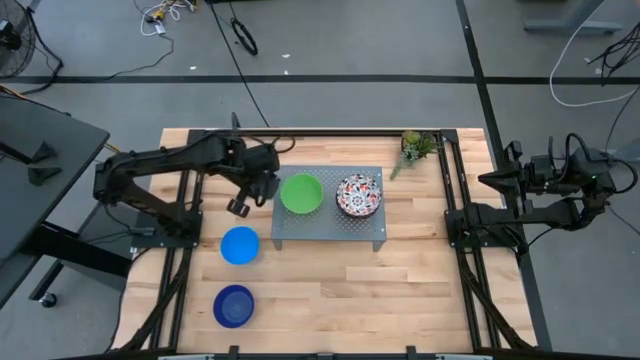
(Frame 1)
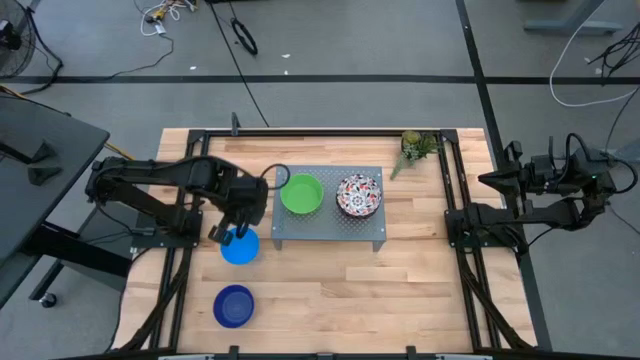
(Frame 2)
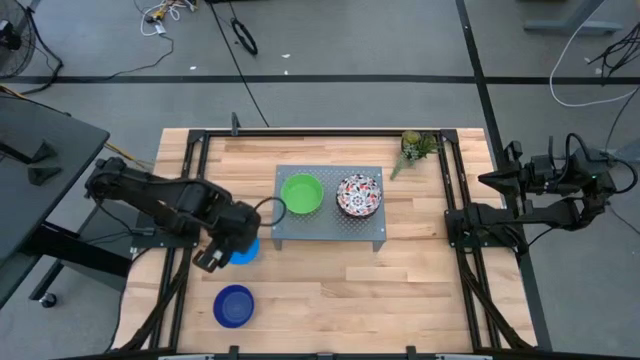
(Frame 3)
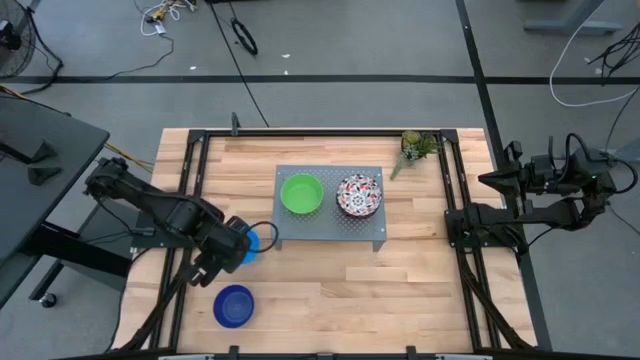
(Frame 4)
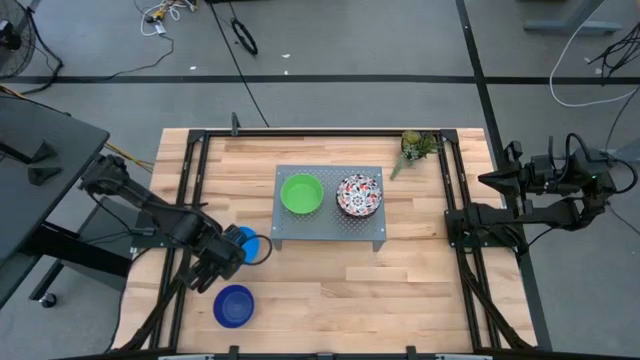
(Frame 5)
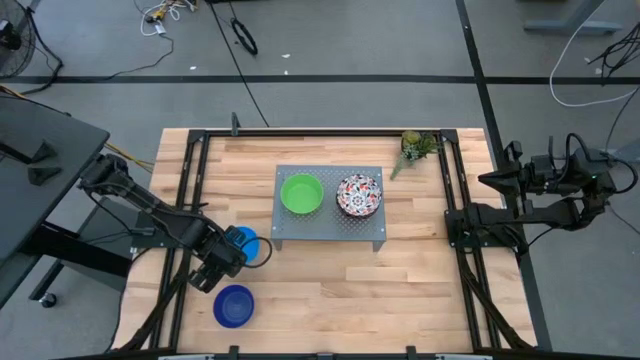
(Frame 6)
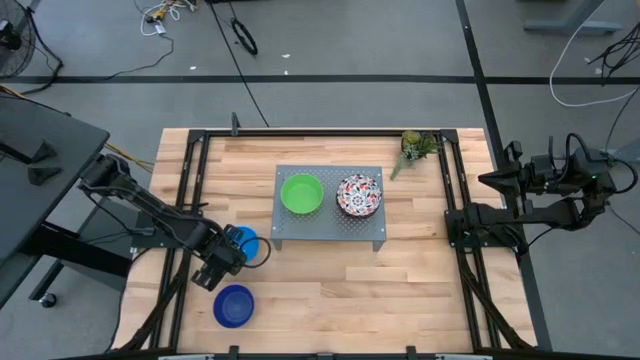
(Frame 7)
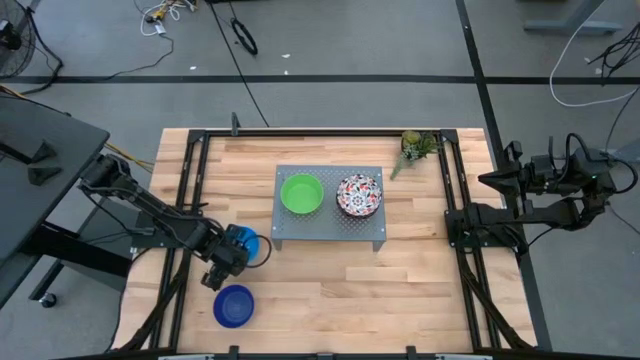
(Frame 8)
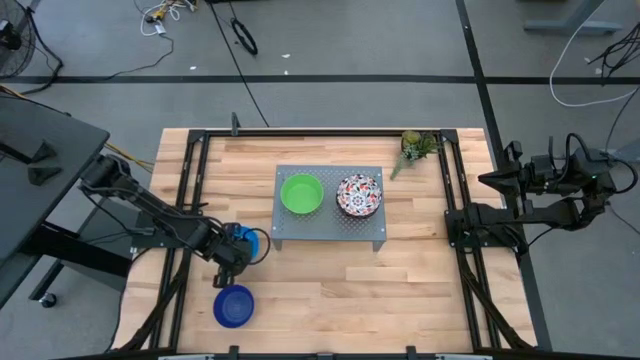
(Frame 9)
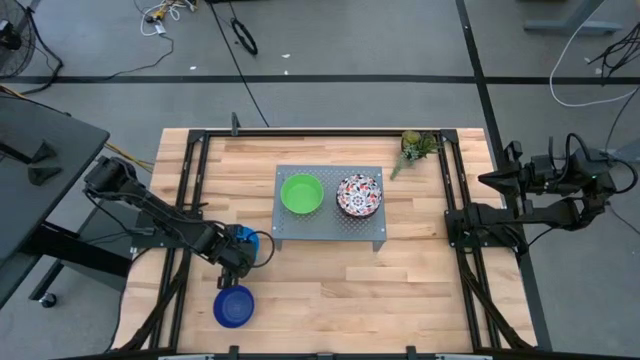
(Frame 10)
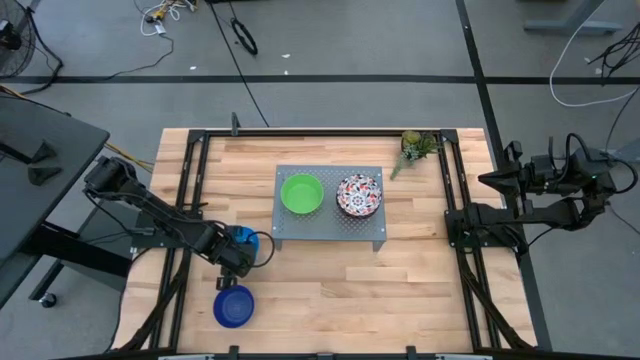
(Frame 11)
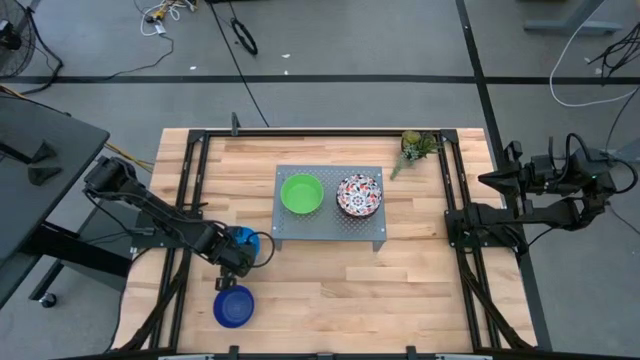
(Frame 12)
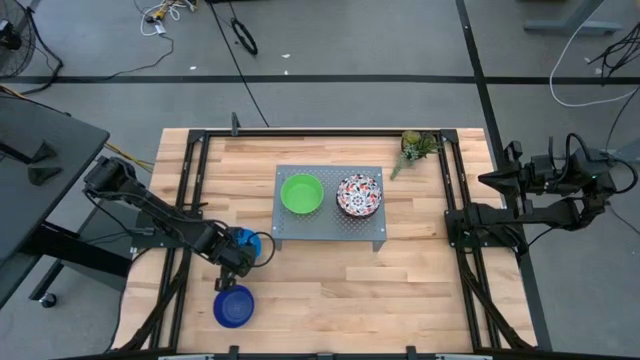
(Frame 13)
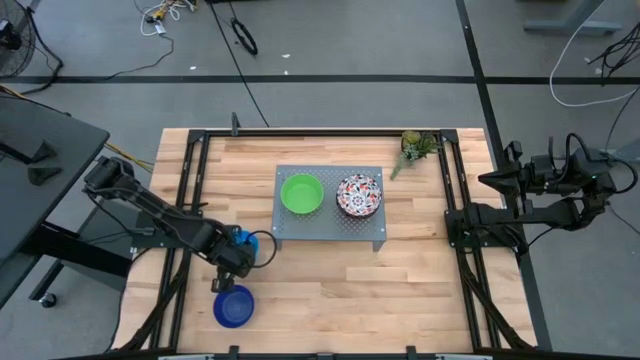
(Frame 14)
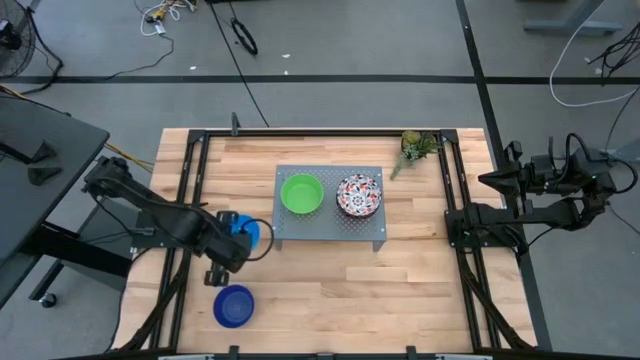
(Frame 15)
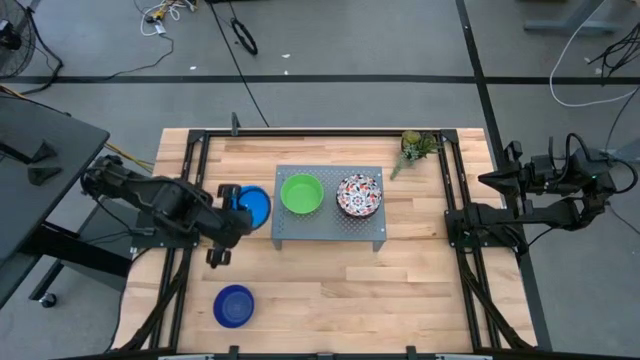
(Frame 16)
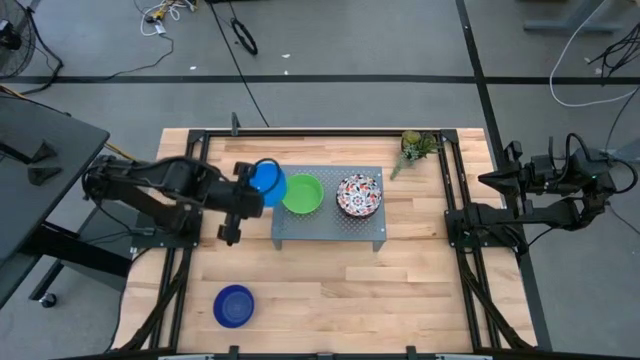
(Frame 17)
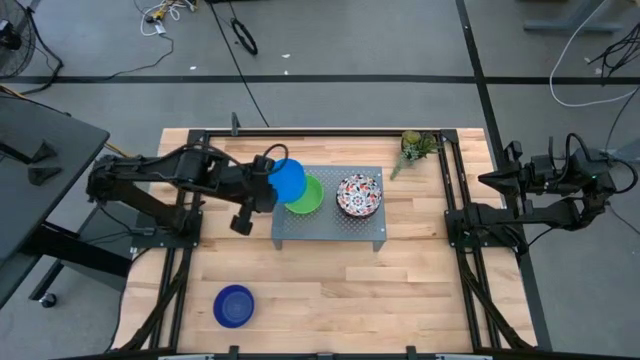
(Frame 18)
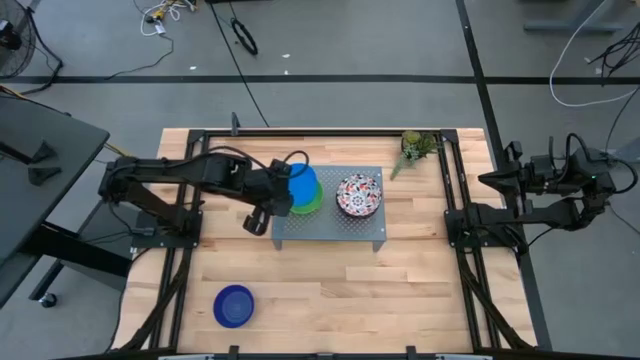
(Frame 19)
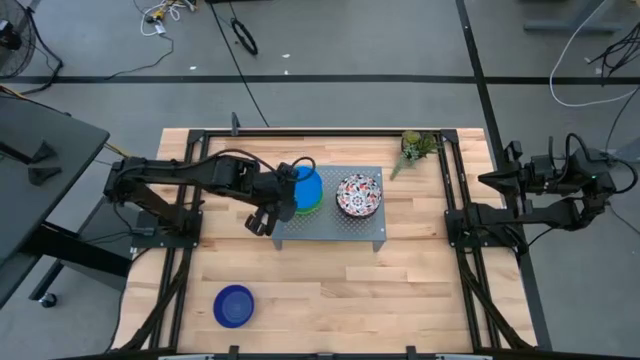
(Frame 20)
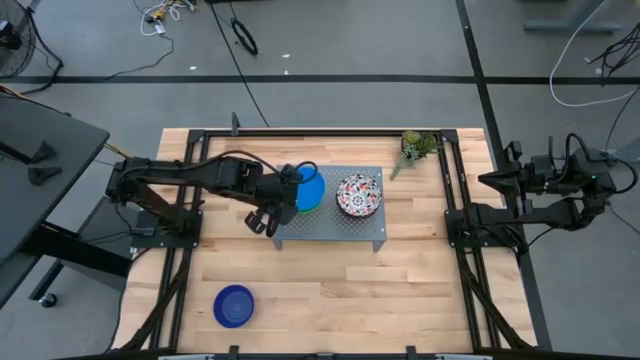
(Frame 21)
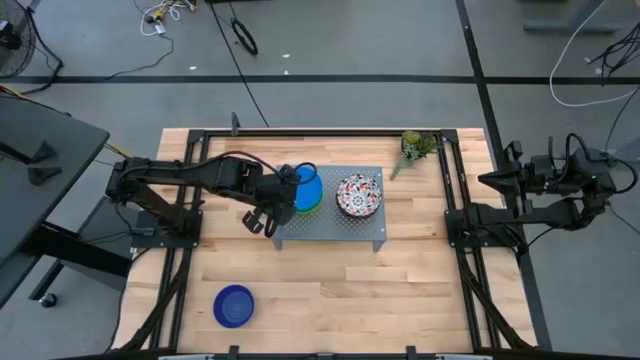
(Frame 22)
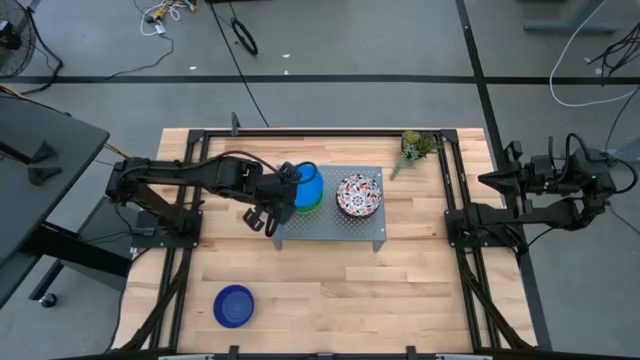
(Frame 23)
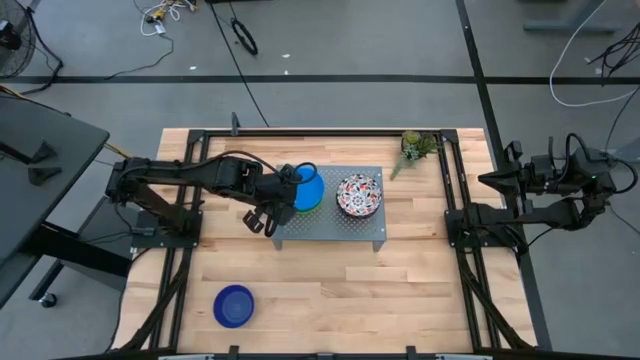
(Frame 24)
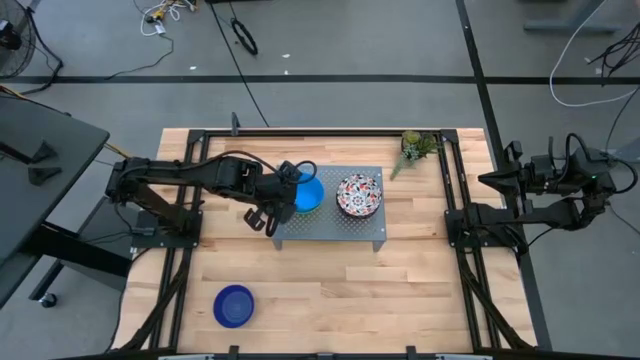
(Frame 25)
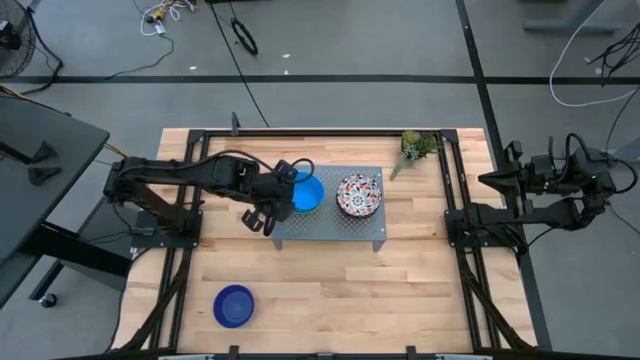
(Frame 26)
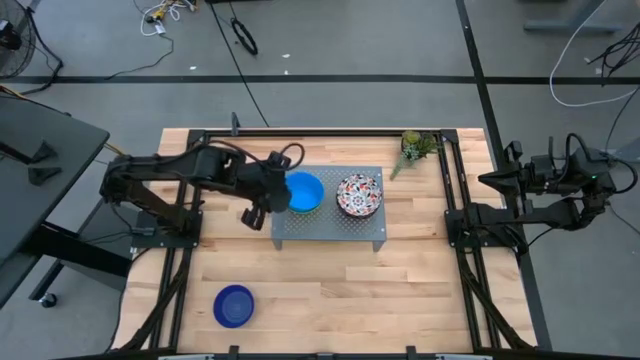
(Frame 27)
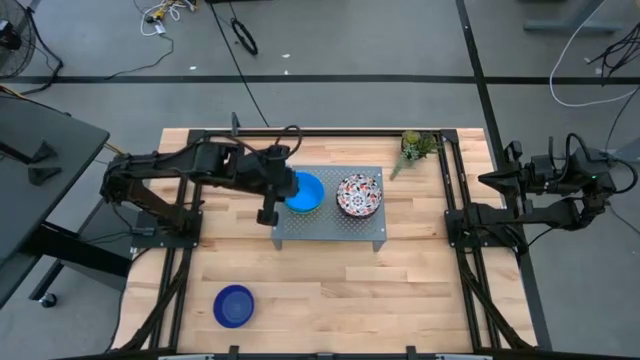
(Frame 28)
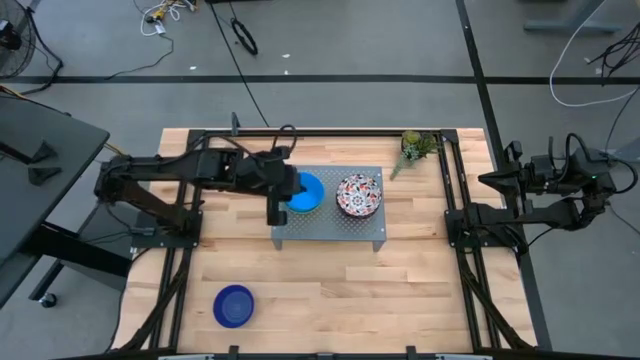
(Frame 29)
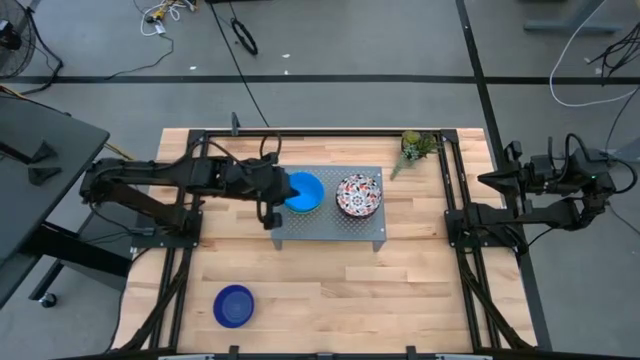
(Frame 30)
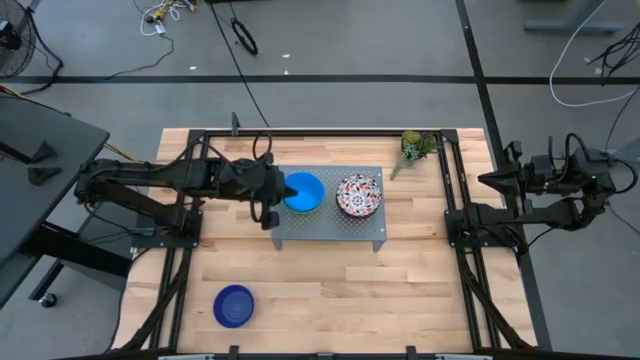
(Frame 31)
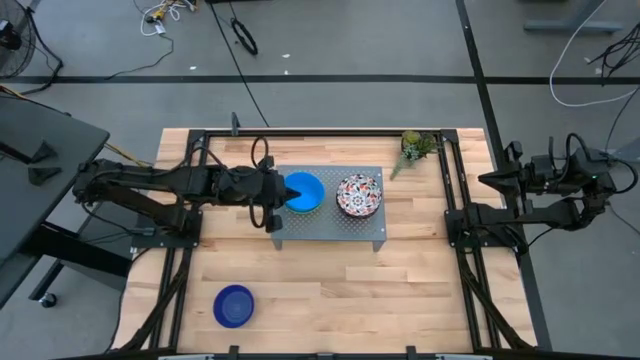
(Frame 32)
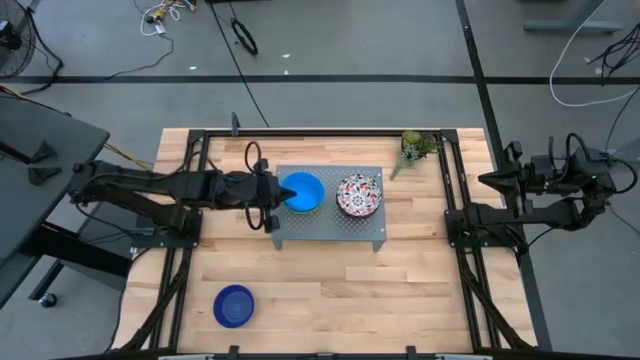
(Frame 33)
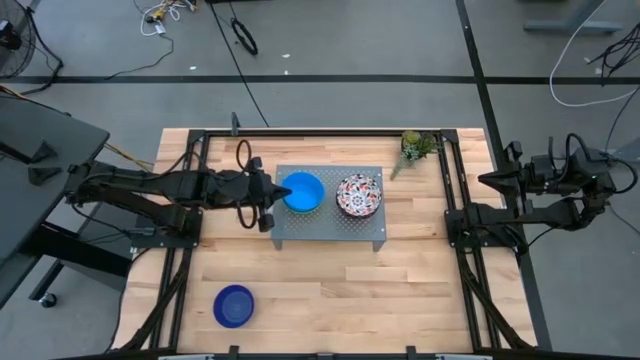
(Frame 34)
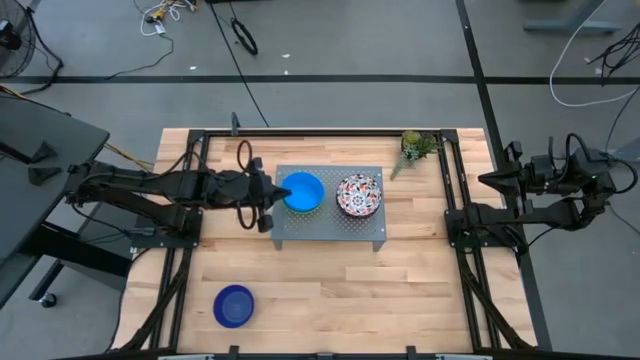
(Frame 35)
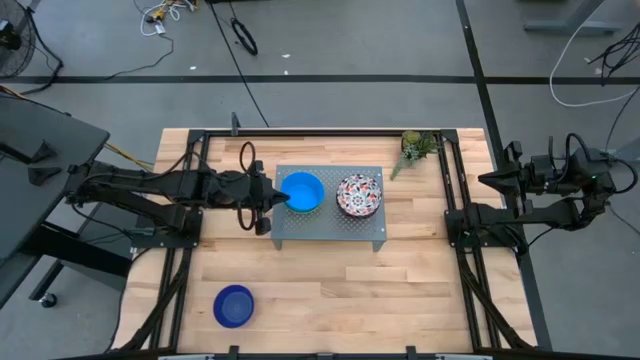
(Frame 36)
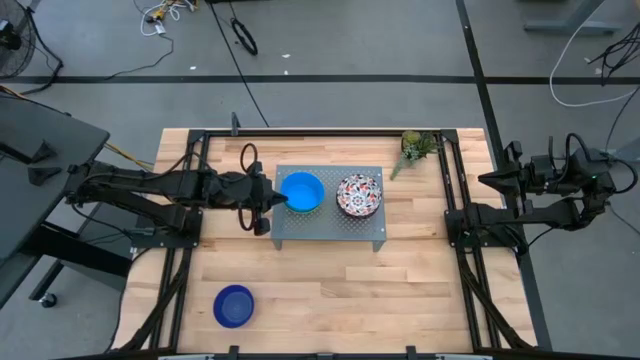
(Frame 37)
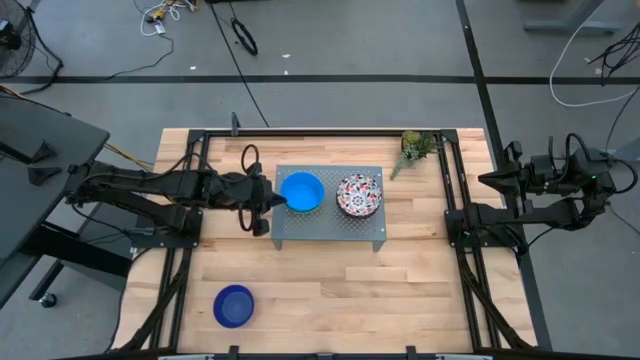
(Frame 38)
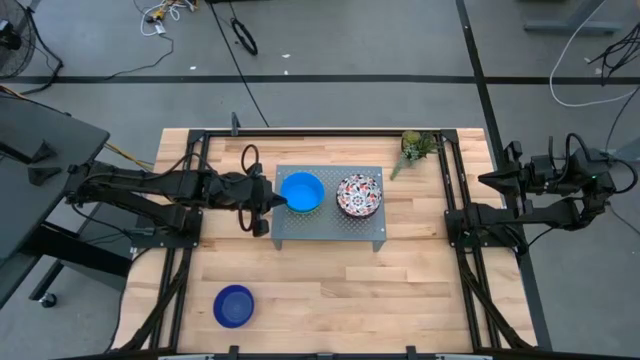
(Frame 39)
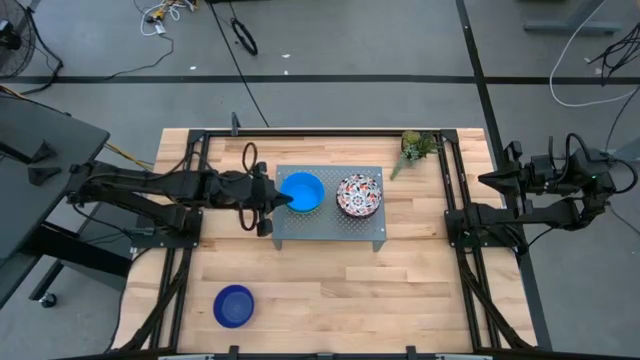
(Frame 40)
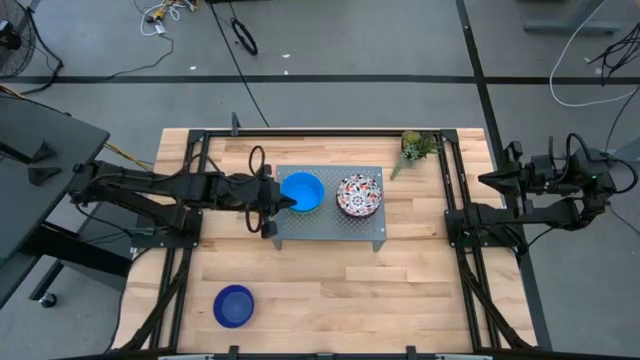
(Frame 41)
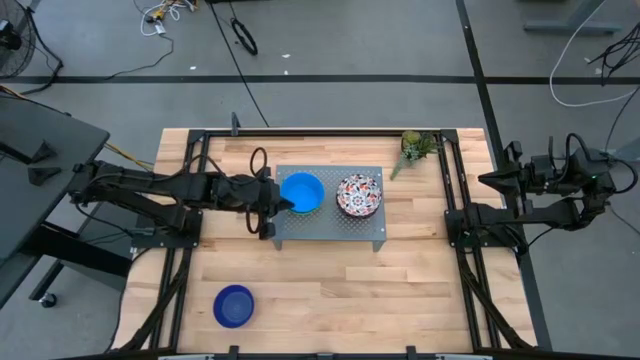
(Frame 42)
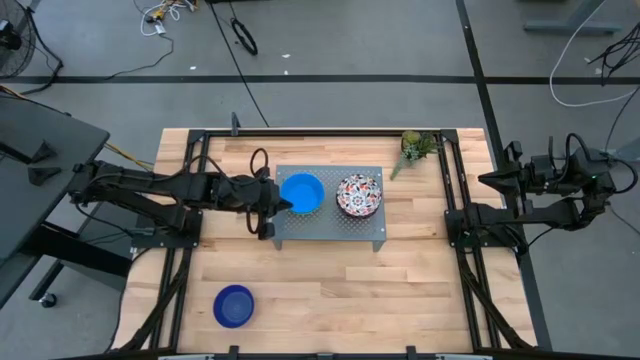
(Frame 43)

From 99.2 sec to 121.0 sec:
Task: Pick & Place Mini bowls
Stack the light blue bowl on top of the other light green bowl on the shelf

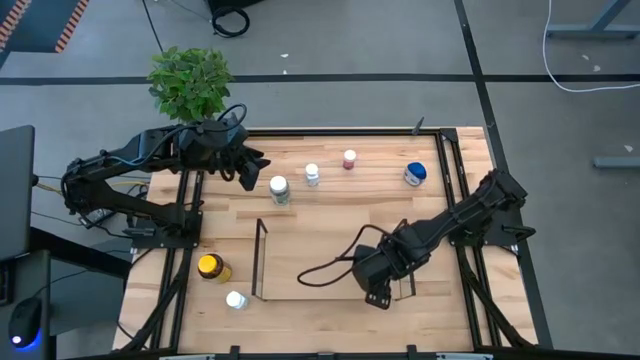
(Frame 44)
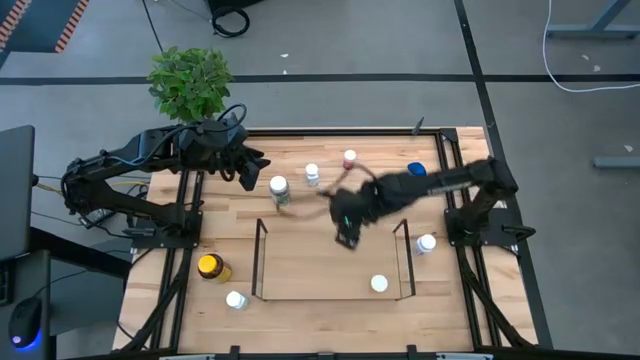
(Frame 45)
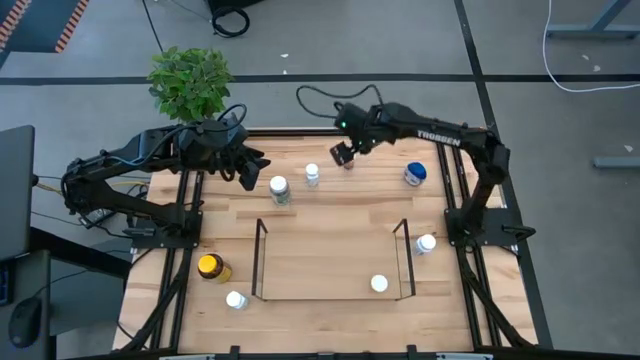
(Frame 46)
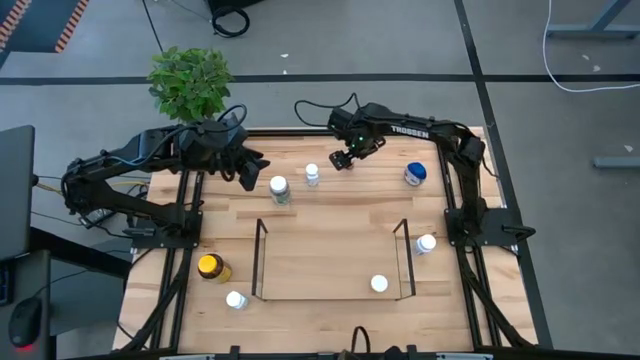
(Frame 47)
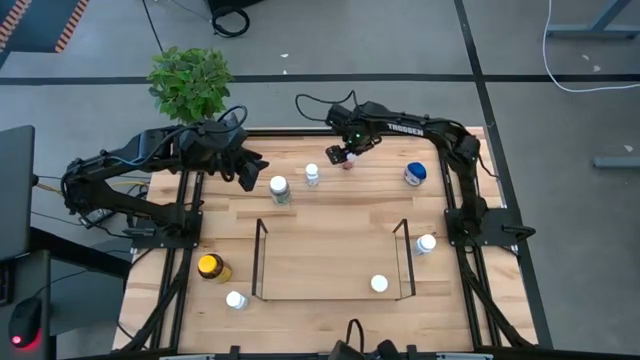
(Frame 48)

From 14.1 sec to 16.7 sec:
Task: Pick and place medicine bottles onto shelf by color
Put the pink pill bottle on the shelf
